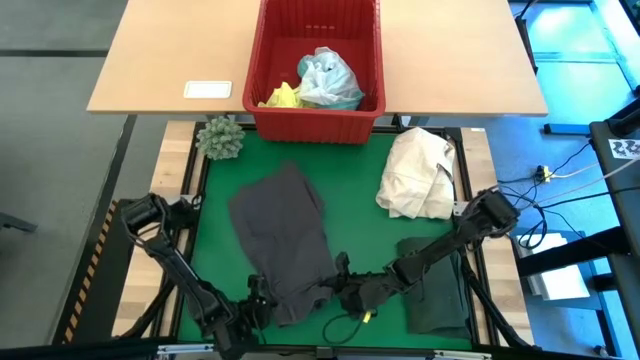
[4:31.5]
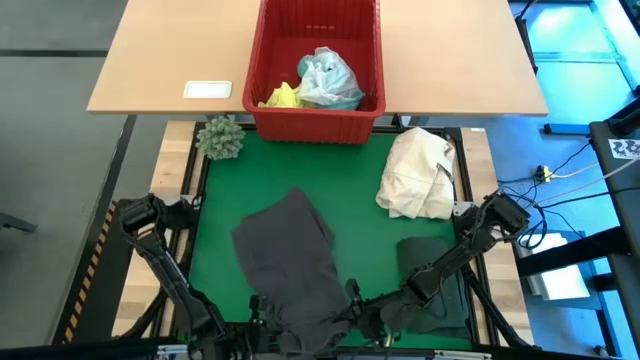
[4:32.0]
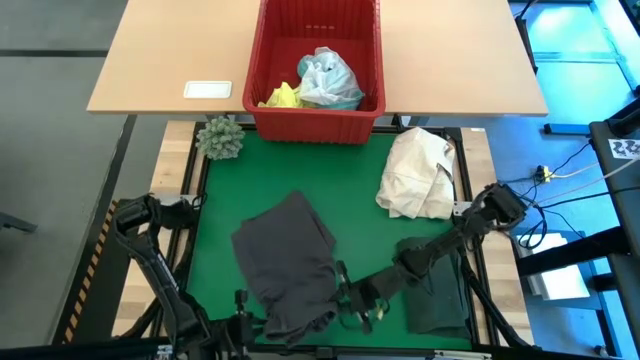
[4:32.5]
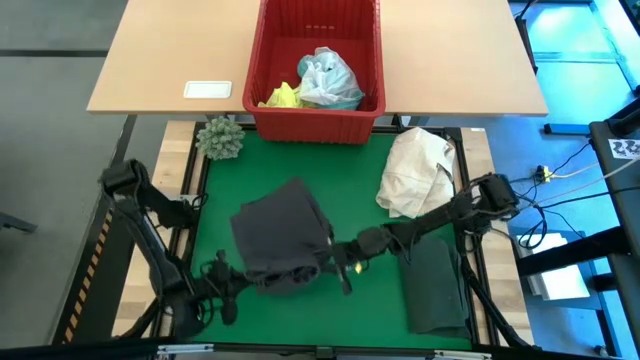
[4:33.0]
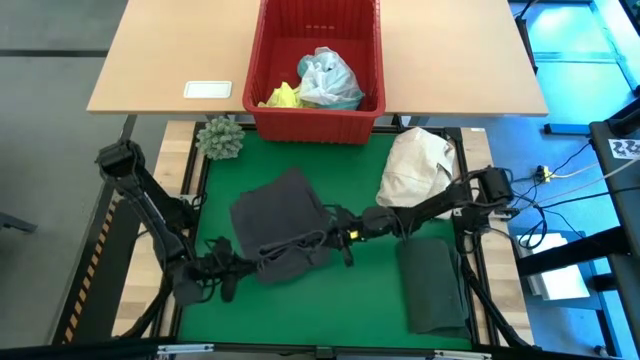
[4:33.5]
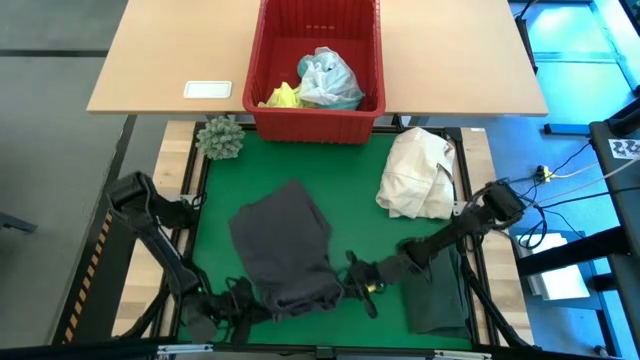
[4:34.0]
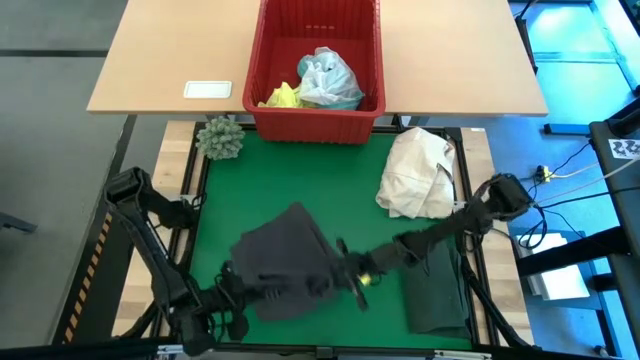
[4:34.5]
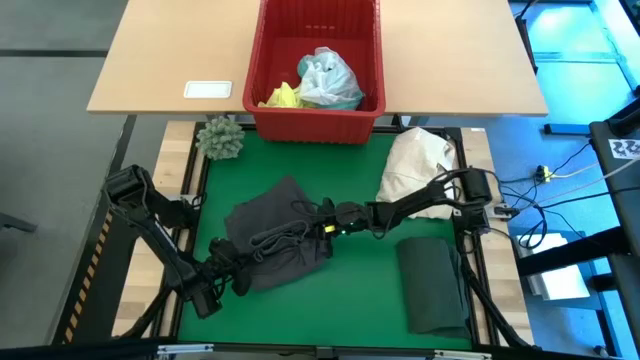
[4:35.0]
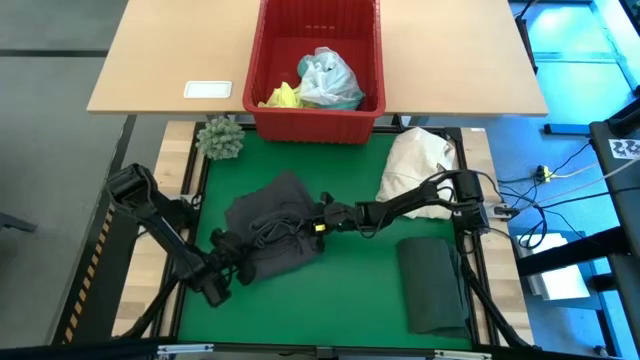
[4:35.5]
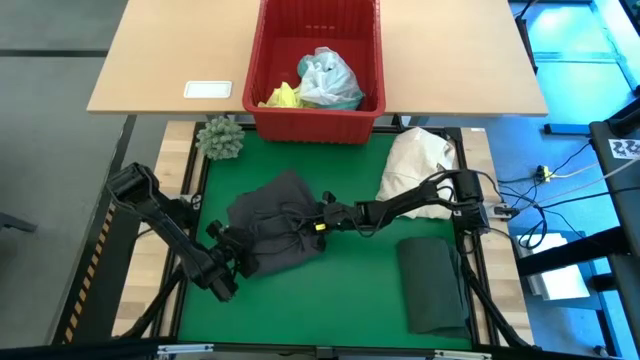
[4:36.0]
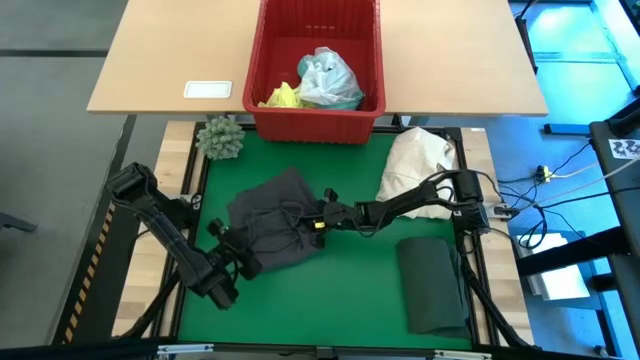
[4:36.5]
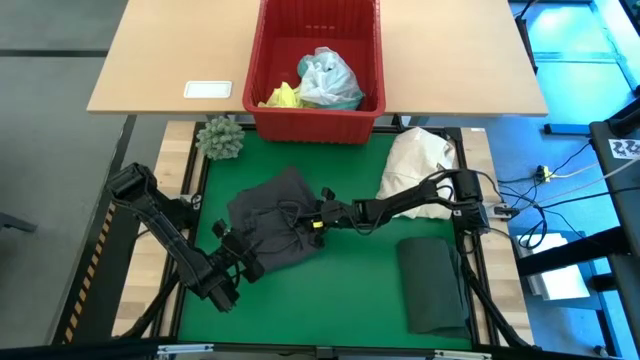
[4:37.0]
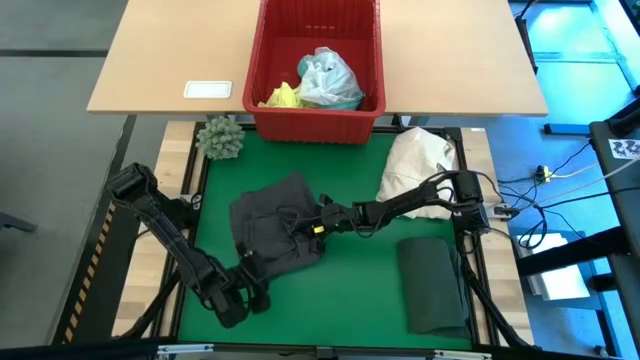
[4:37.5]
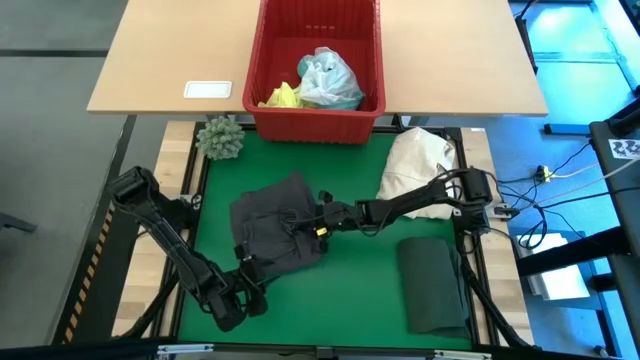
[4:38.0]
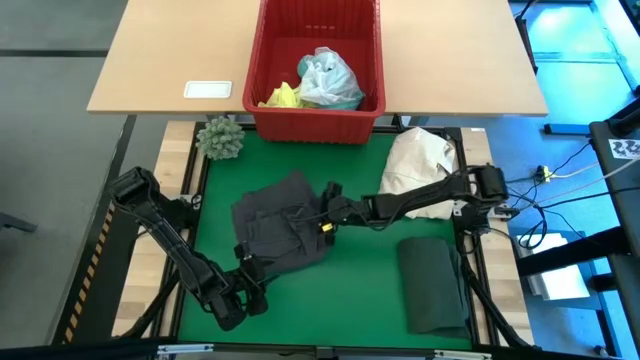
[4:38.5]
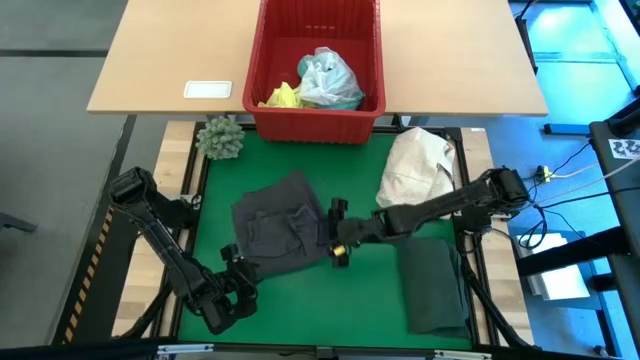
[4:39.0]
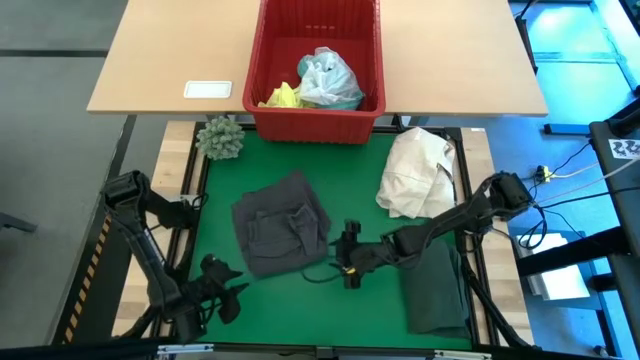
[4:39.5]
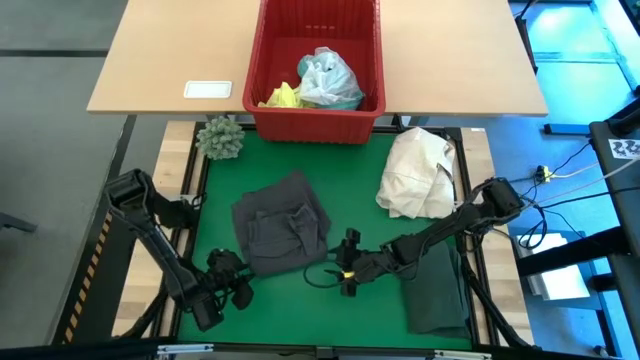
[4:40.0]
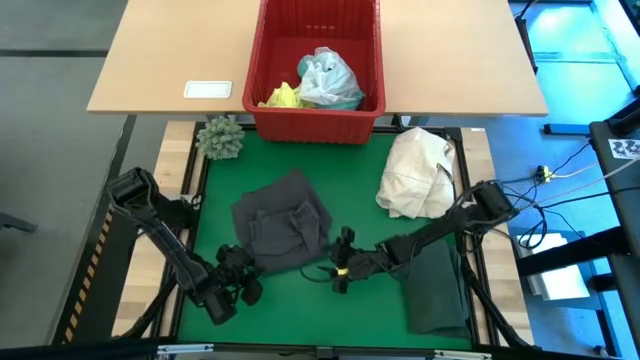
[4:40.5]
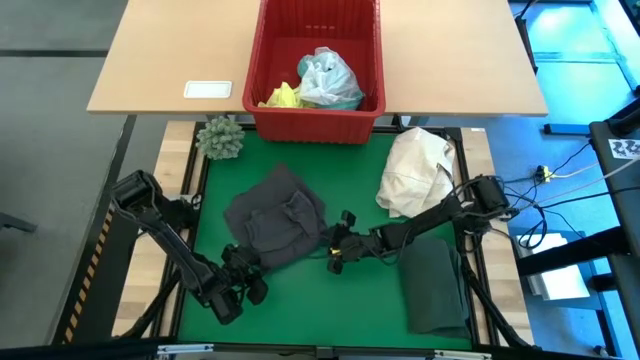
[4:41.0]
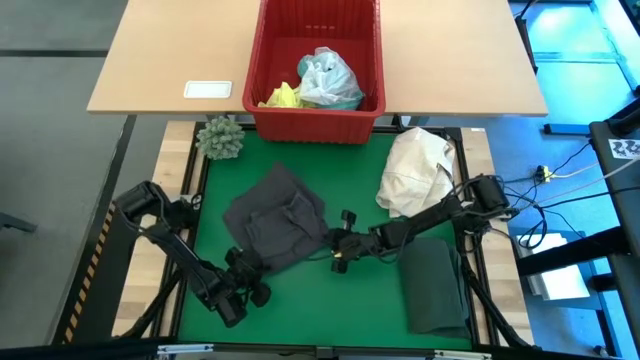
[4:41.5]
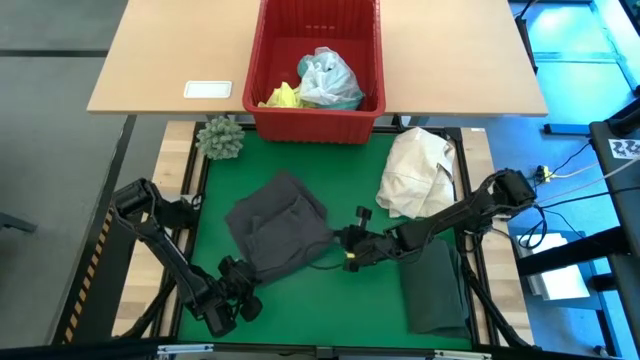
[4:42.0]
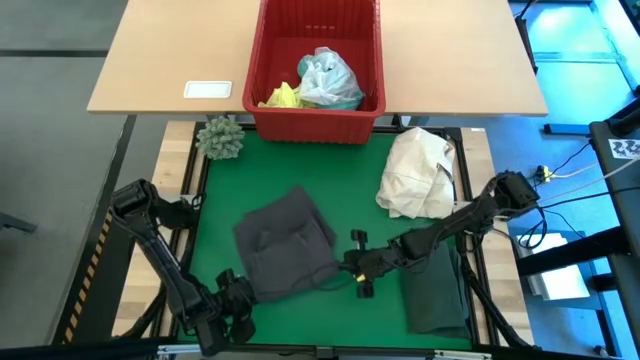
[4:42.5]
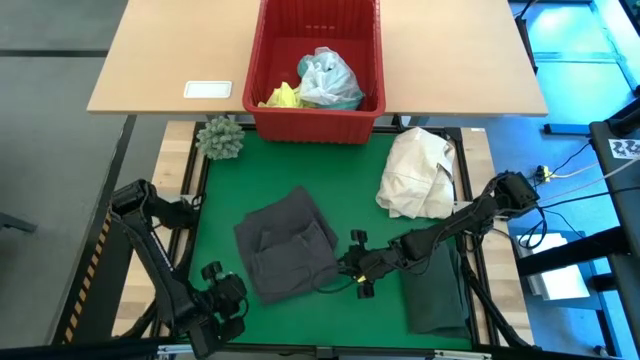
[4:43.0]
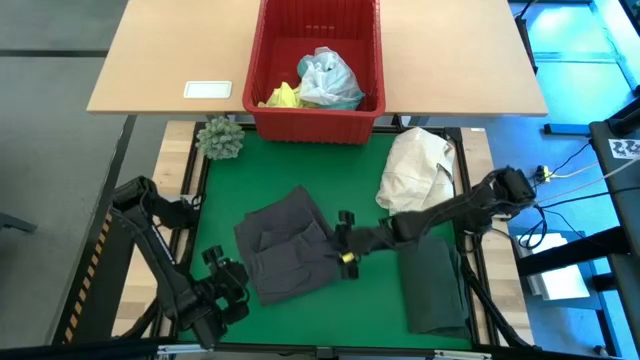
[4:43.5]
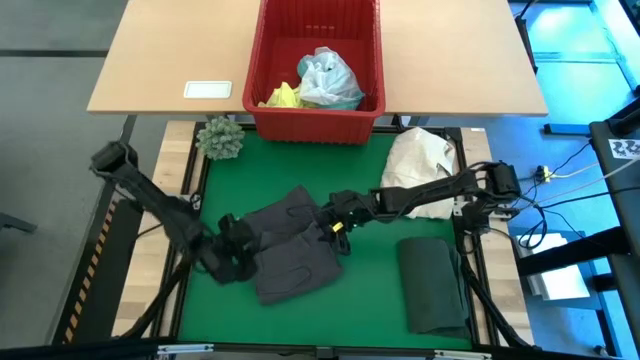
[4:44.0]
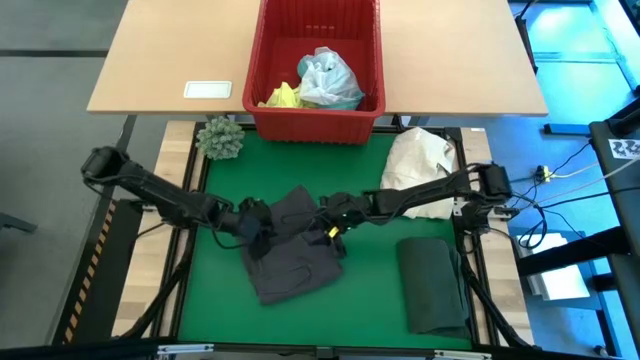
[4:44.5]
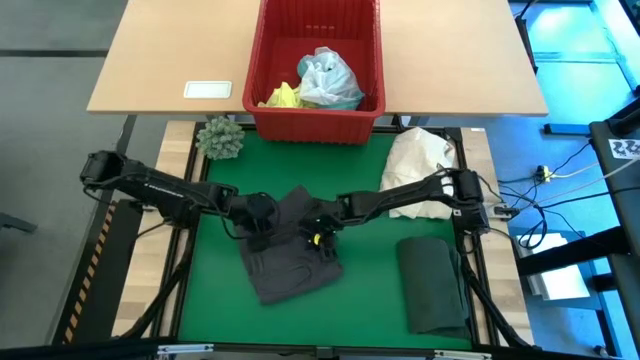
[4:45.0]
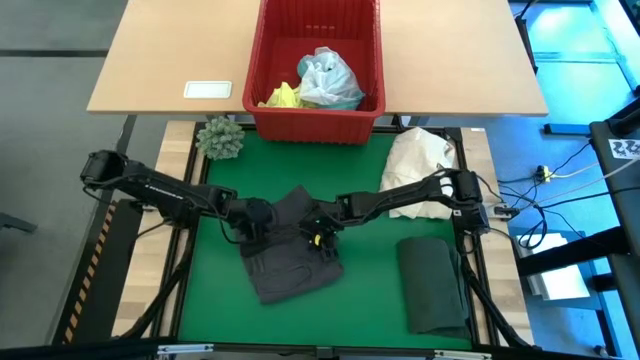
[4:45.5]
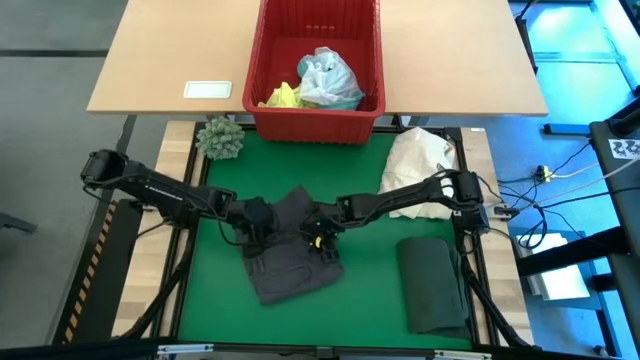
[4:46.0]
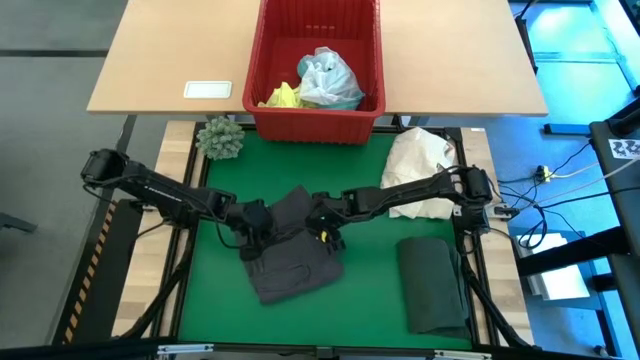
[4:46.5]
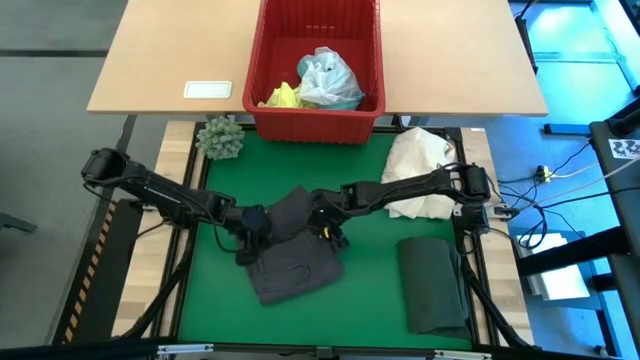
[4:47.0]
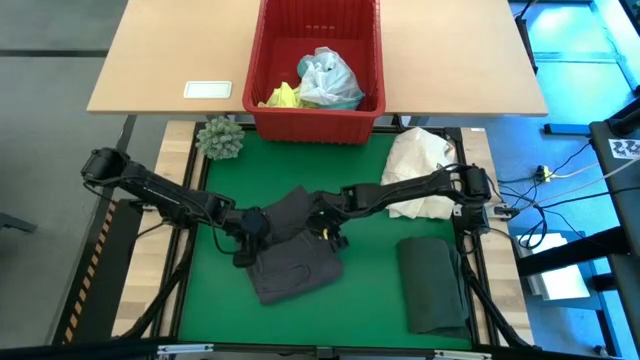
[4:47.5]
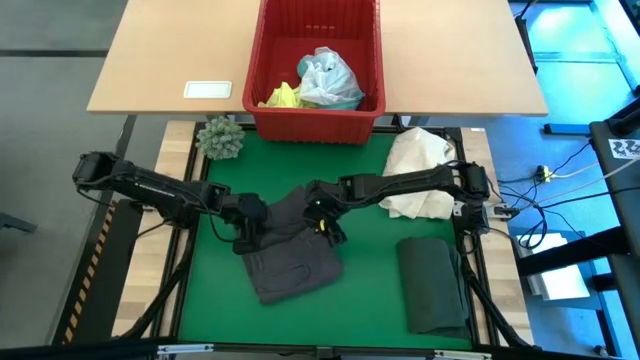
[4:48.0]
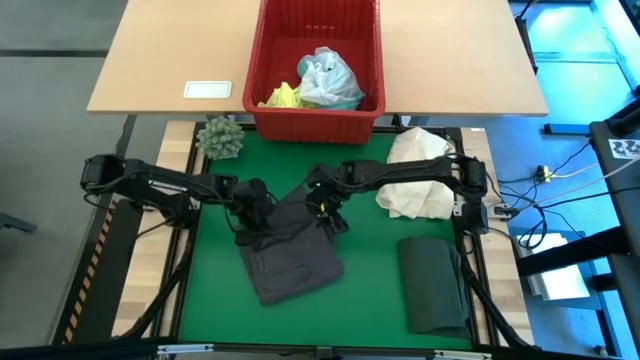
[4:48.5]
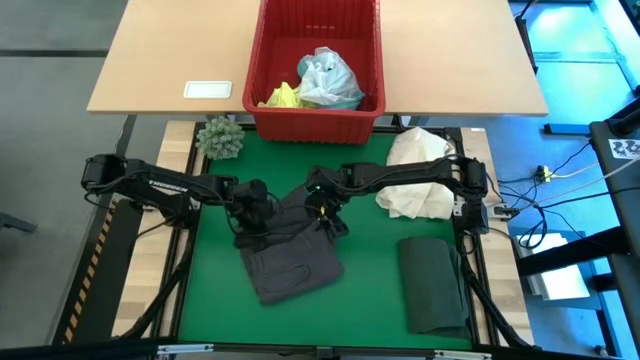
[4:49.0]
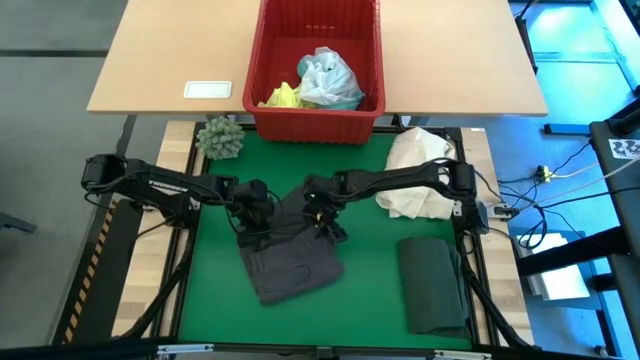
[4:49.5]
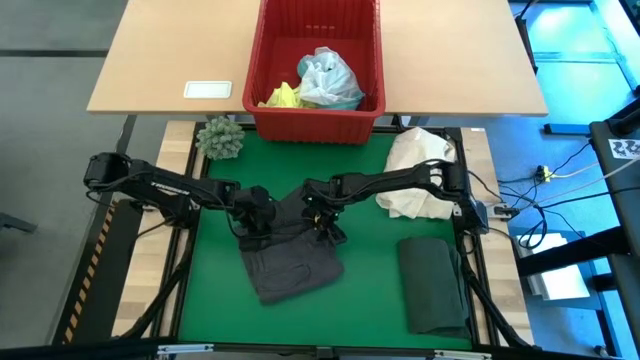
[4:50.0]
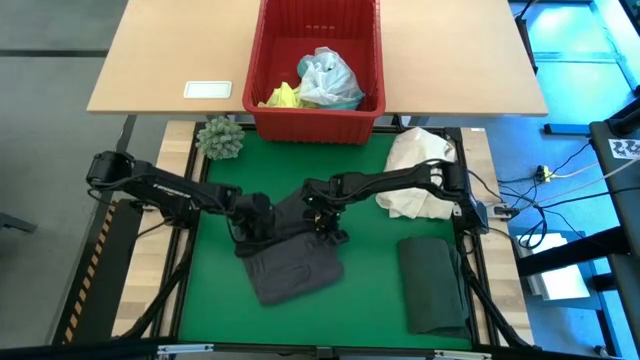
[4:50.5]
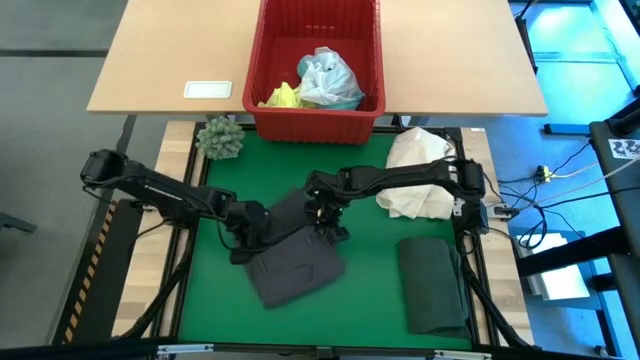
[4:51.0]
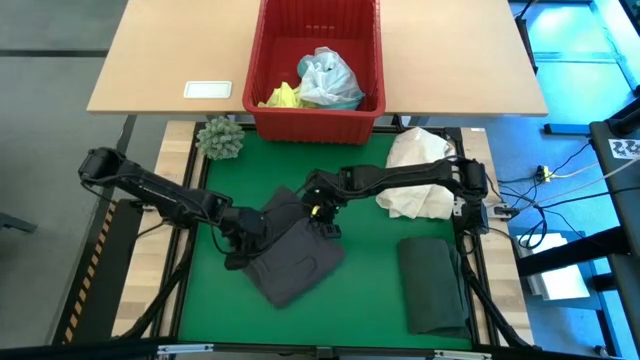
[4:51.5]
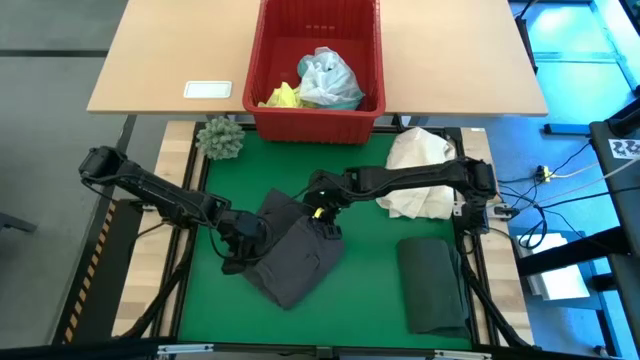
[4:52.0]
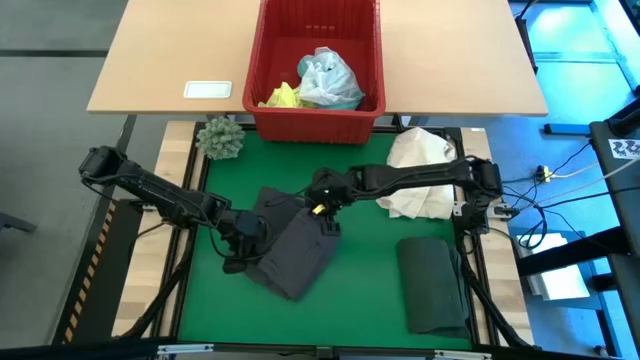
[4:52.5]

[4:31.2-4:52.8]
Task: Fold Laundry from Bin
Fold the gray short
